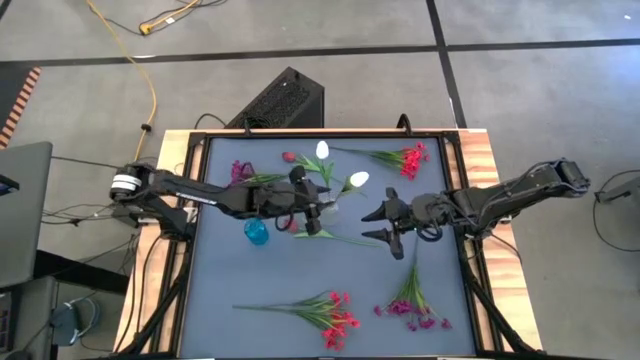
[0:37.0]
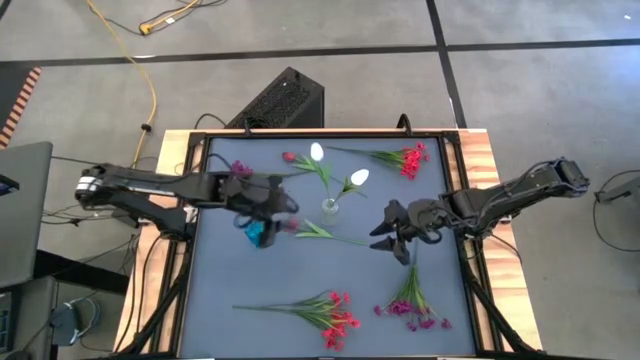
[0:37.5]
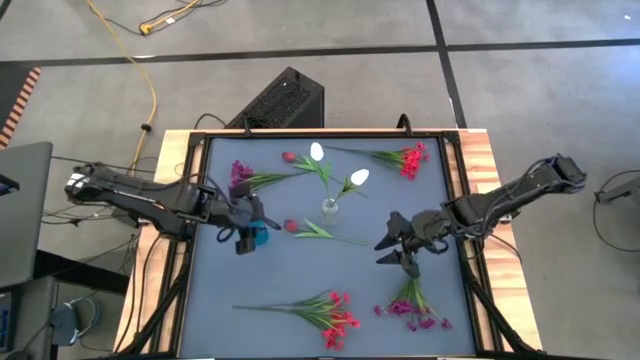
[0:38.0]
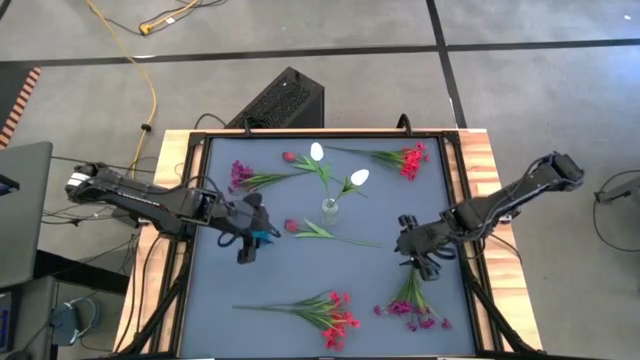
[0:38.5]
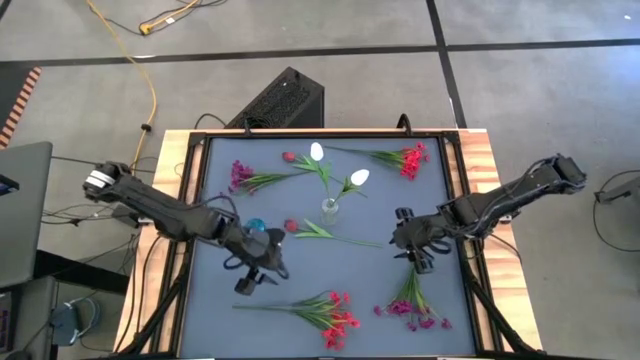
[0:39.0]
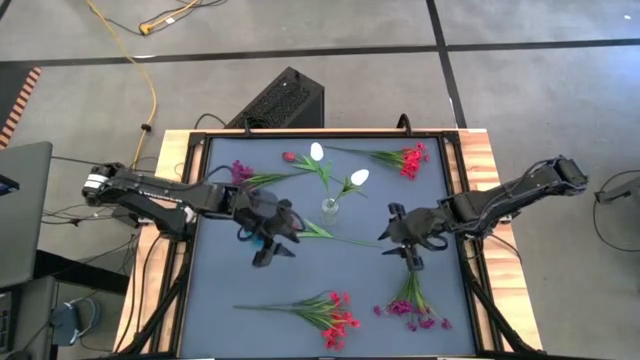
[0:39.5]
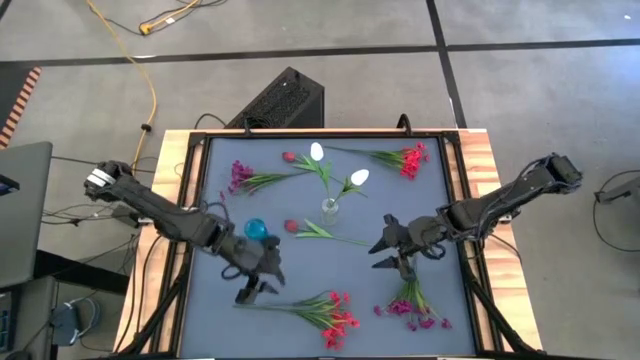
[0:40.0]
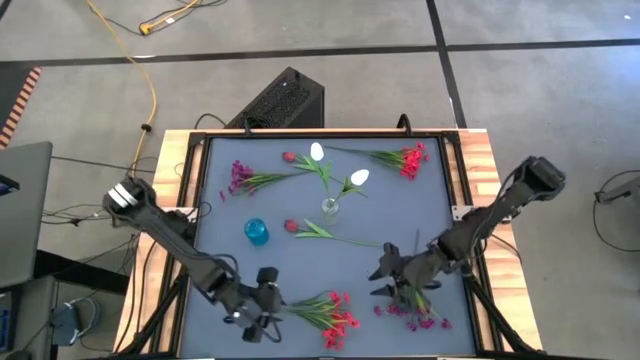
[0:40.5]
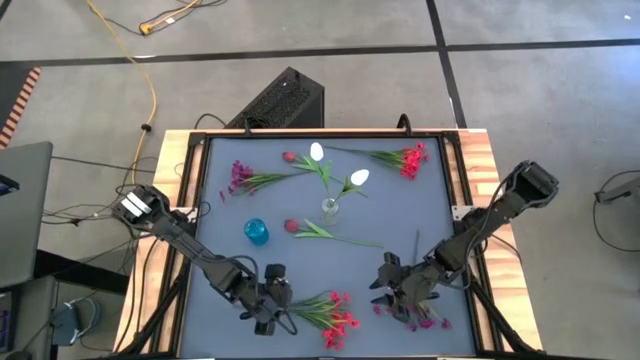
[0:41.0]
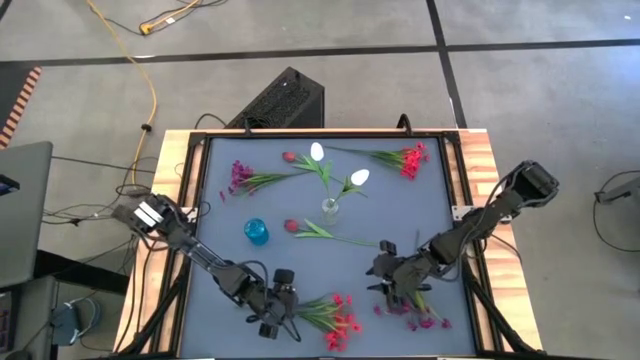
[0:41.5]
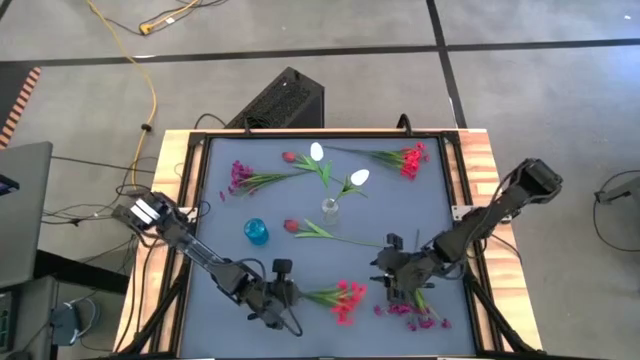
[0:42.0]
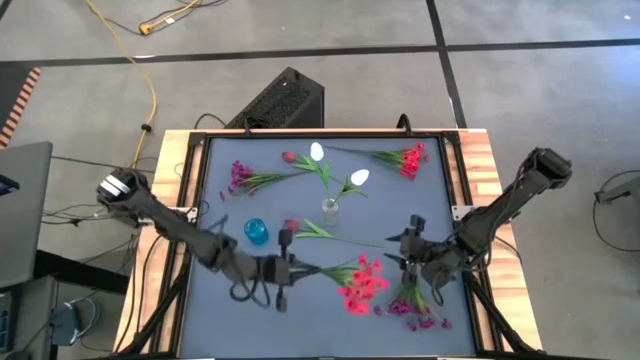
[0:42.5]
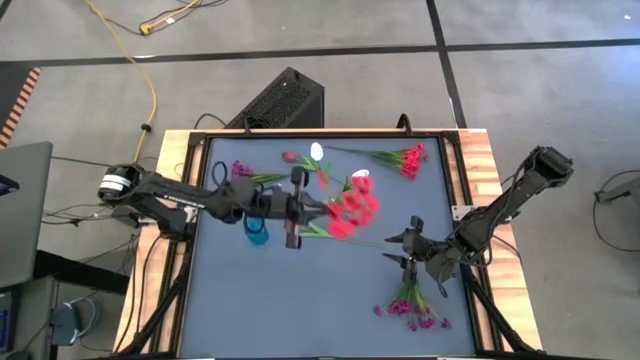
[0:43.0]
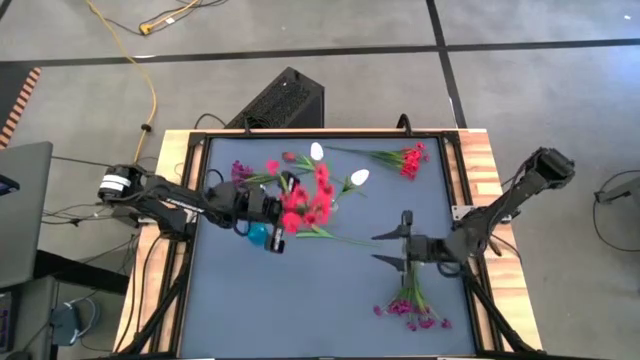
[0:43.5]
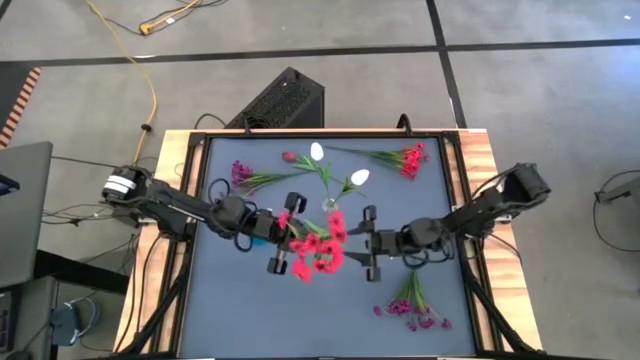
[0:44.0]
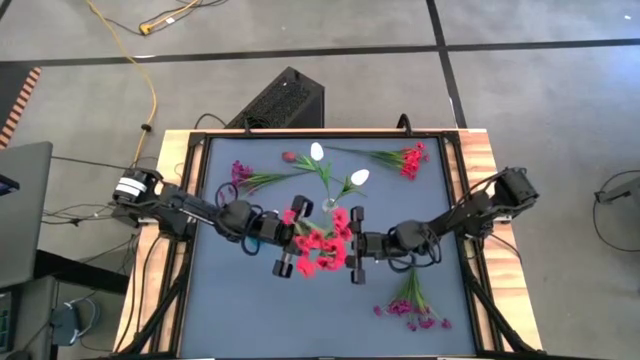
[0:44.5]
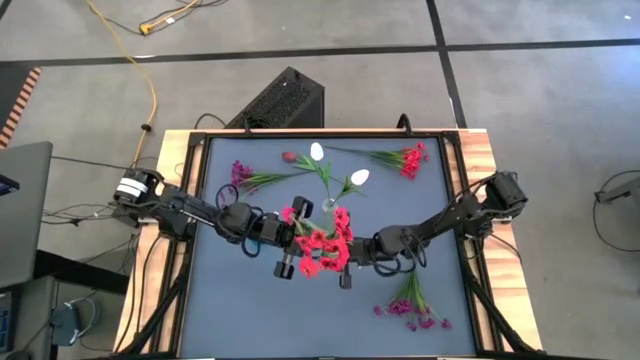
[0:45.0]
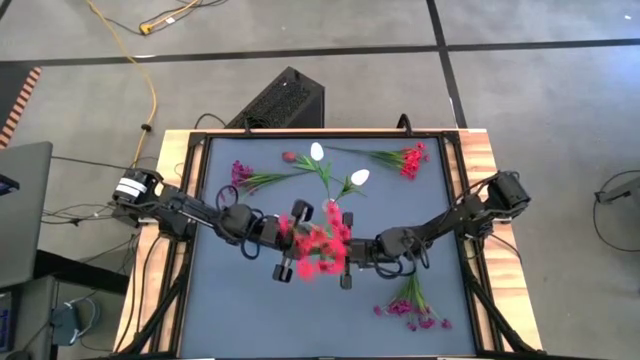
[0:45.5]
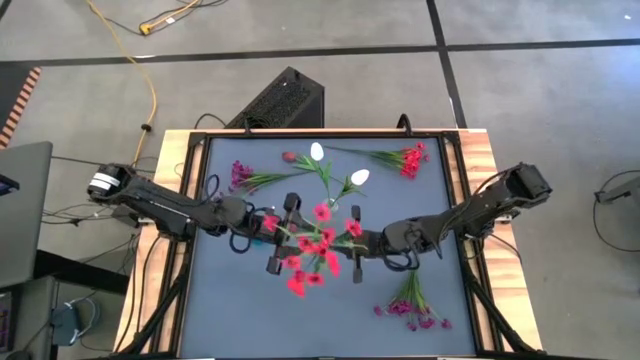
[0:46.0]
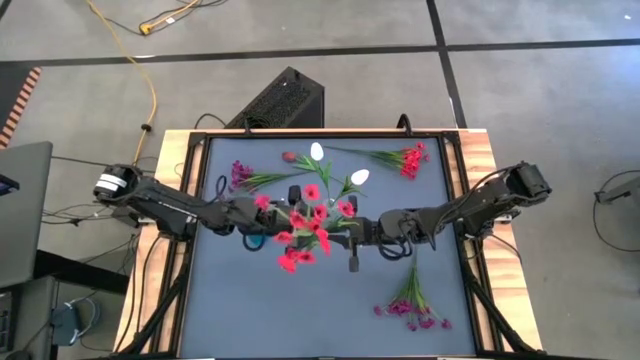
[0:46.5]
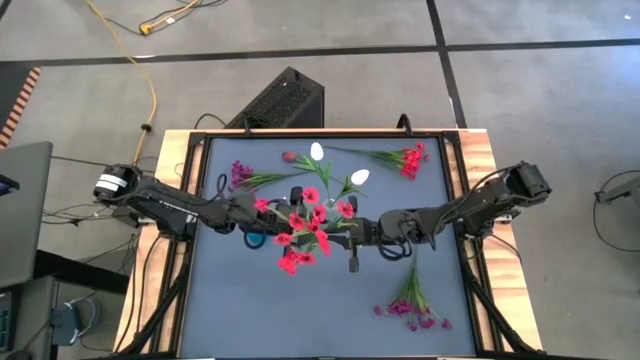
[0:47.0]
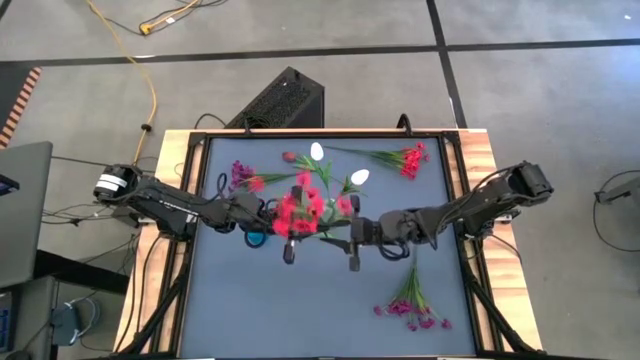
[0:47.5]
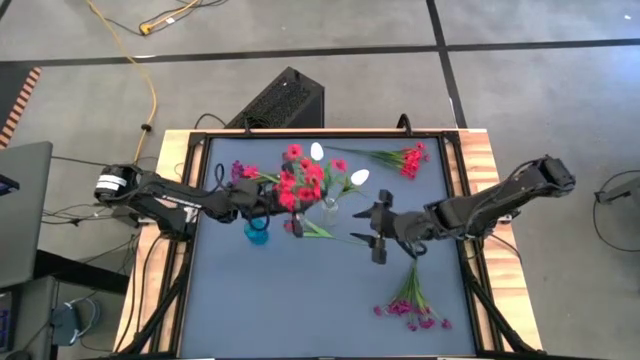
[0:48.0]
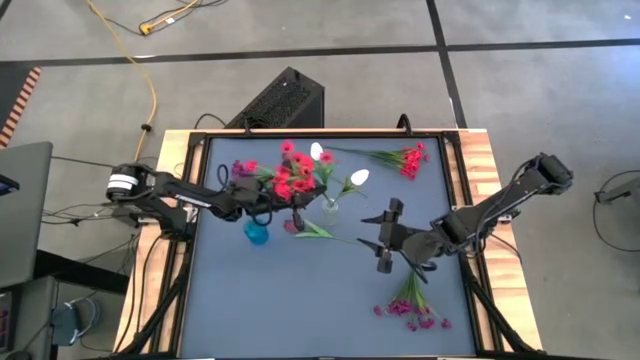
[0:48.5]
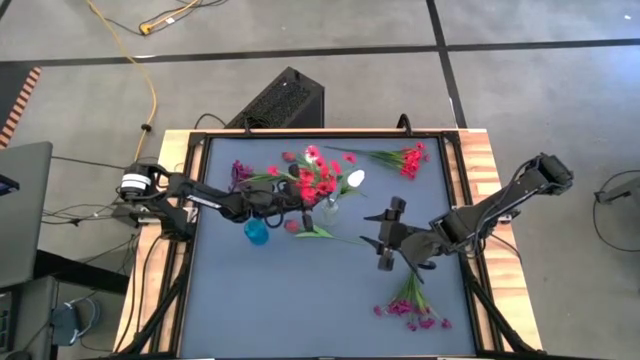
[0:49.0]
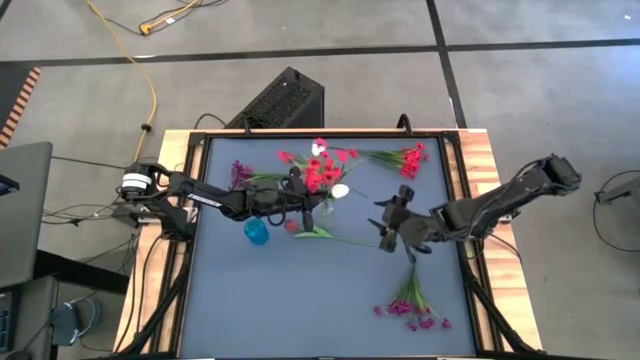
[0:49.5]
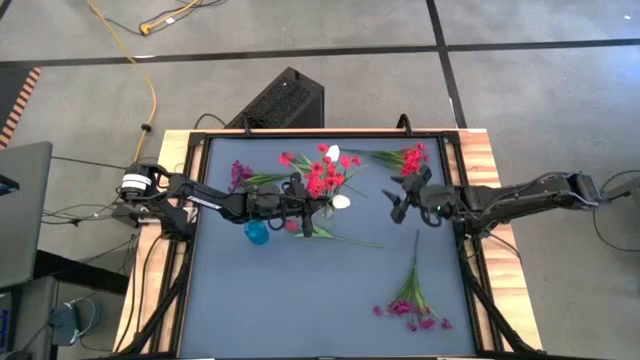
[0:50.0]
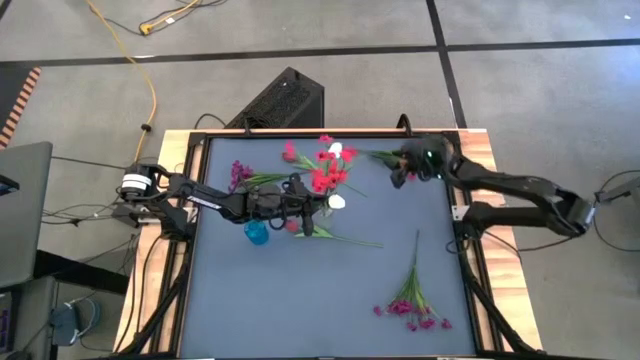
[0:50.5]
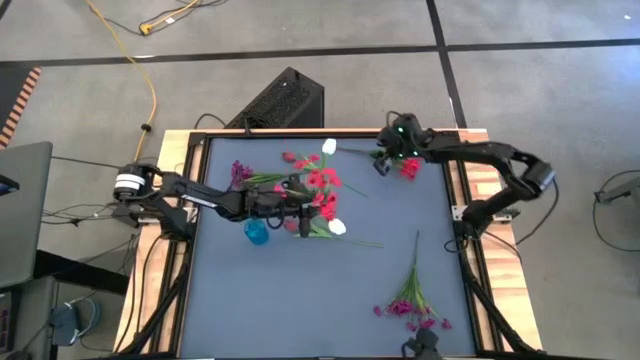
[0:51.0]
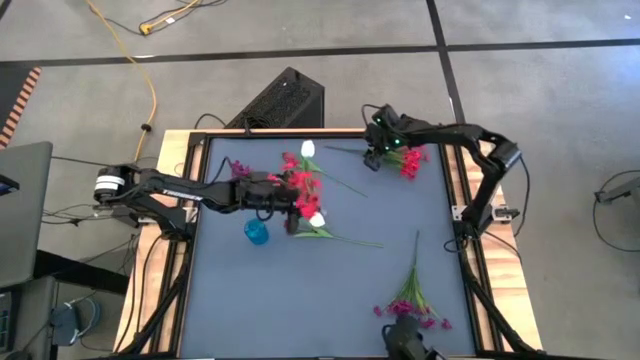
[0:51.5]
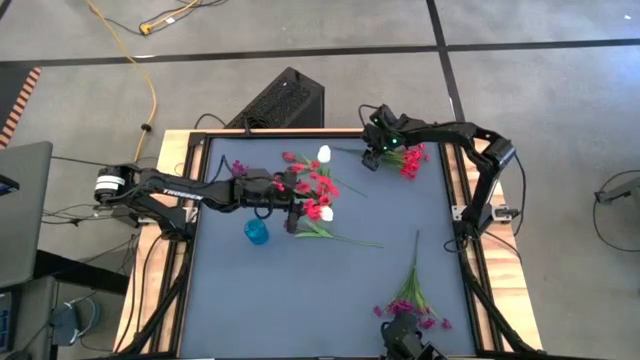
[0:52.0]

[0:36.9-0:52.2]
Task: Sort flowers into vase by color
Put the bottom red flowers into the transparent vase

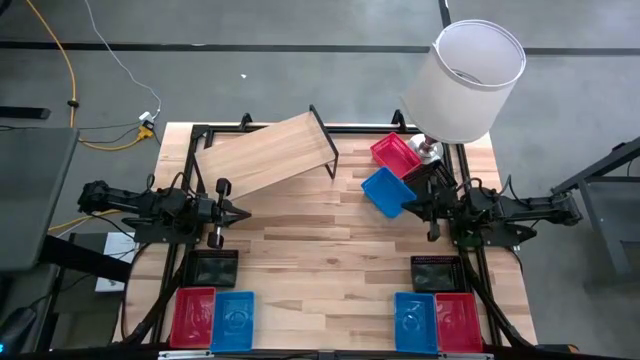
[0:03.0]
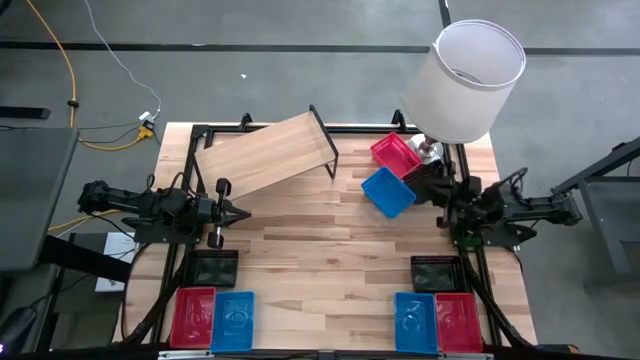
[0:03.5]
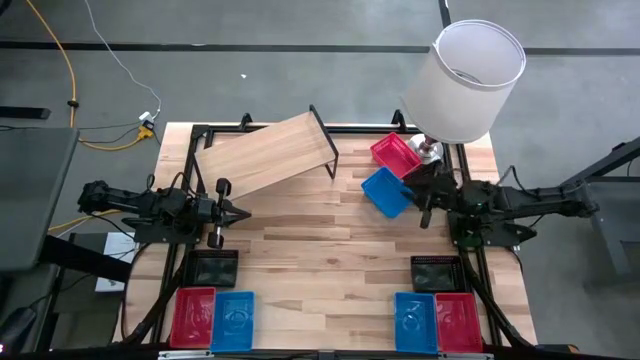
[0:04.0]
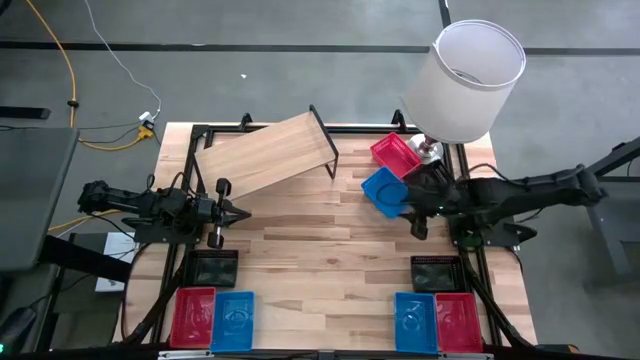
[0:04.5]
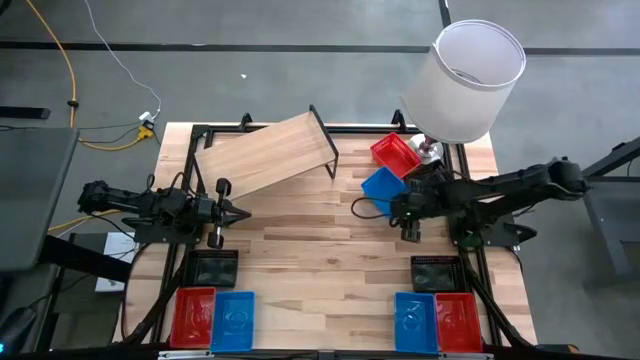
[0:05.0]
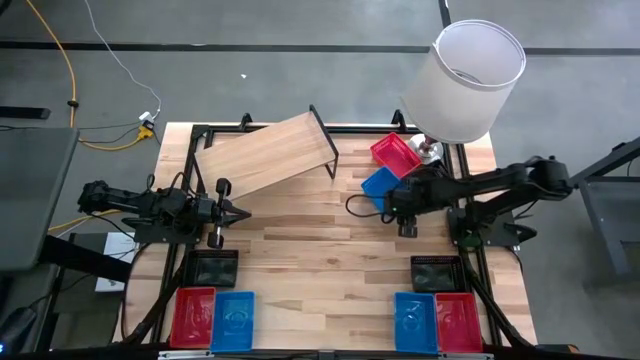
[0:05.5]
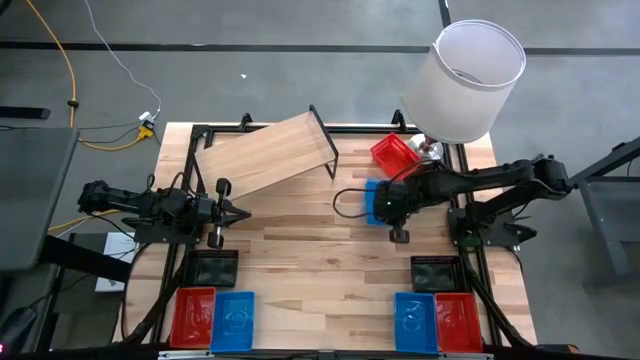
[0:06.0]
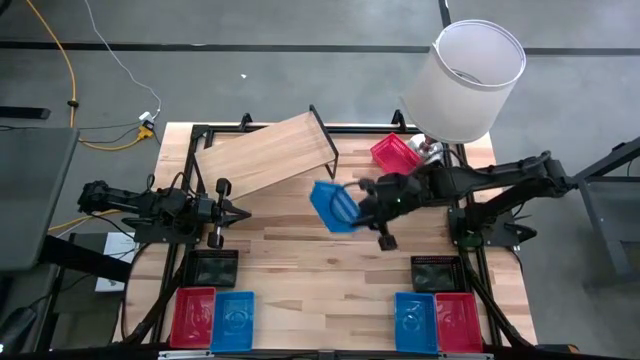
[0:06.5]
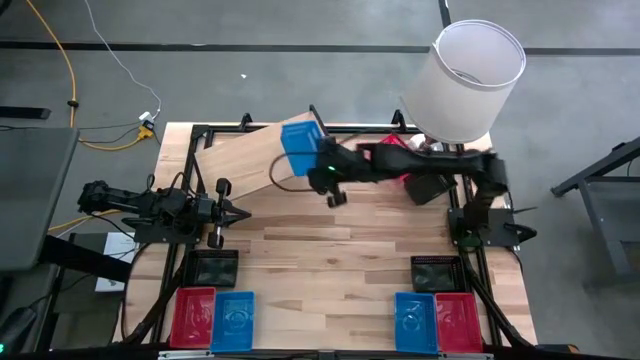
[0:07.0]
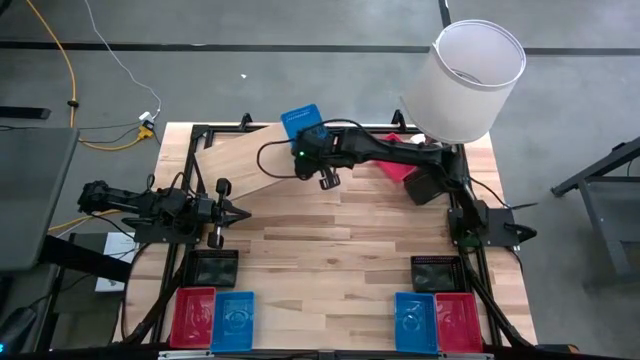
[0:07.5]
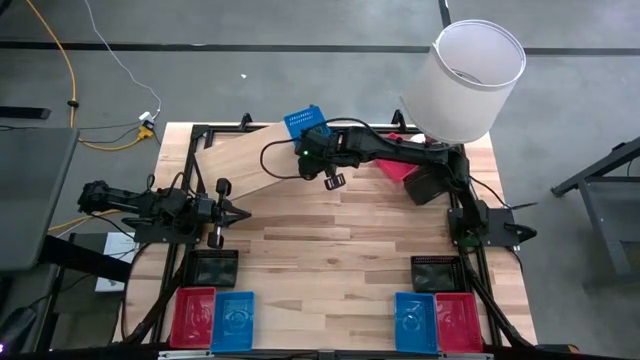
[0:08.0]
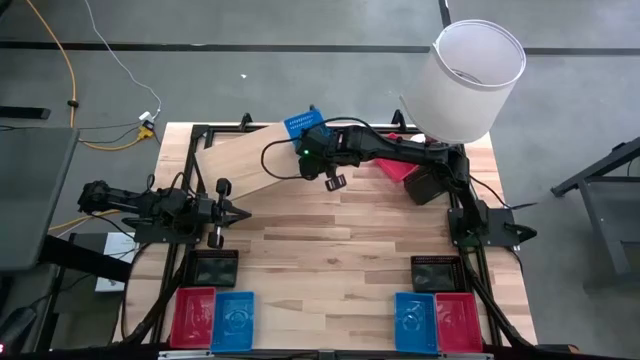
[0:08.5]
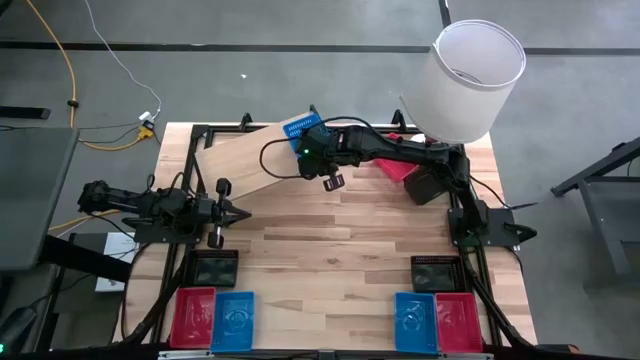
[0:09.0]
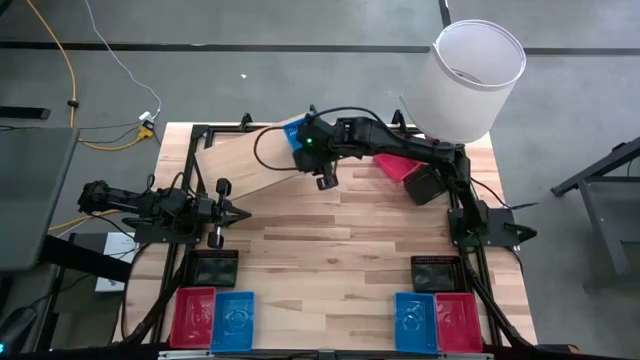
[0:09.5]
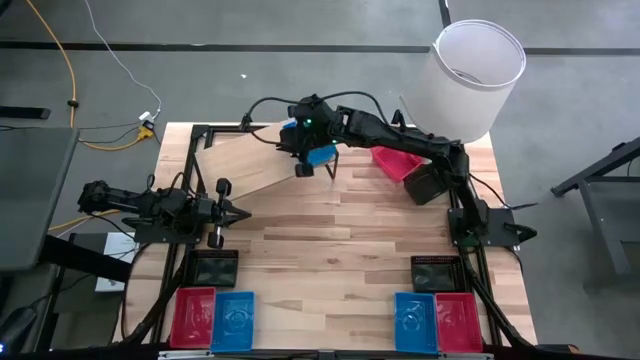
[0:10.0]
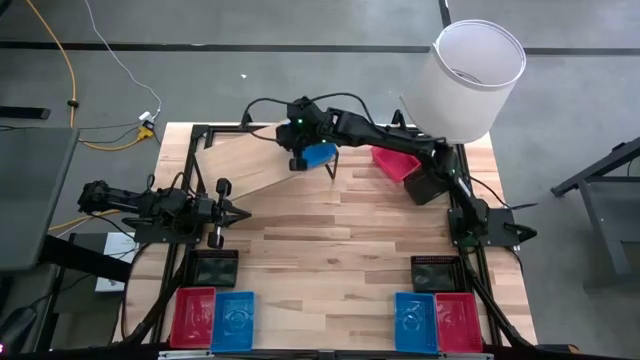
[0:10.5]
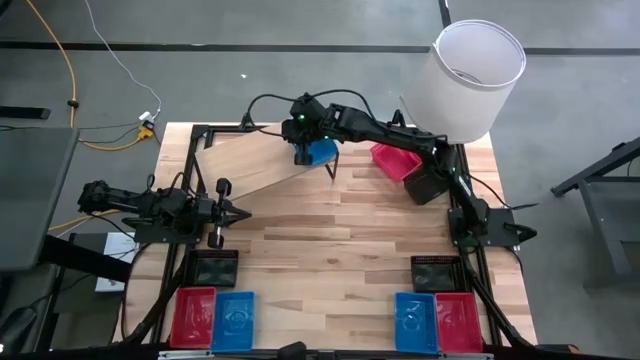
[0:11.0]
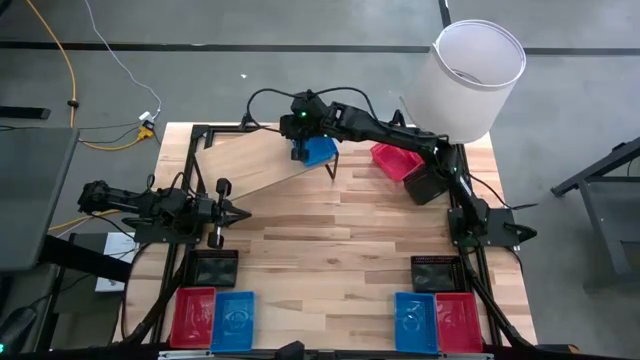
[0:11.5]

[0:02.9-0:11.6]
Task: Stack baskets on shelf by color
Put the top right blue bin on the shelf
